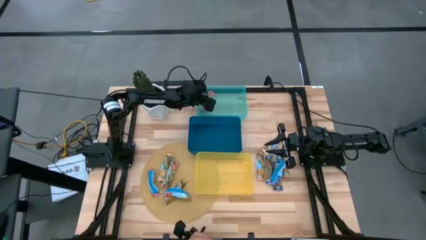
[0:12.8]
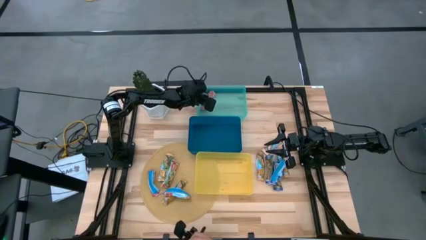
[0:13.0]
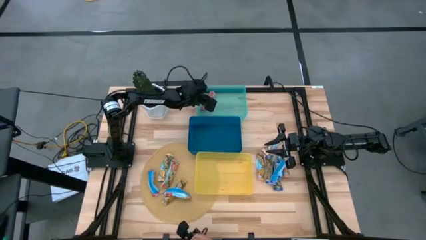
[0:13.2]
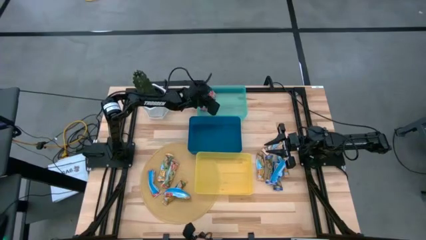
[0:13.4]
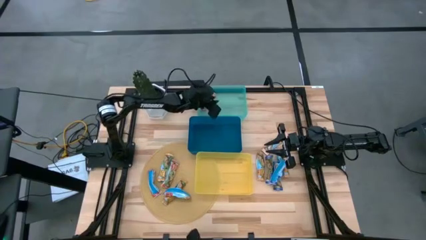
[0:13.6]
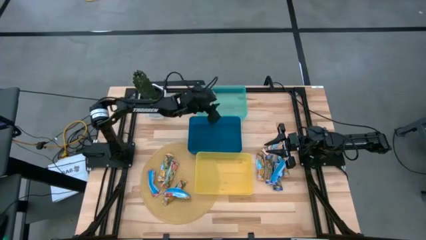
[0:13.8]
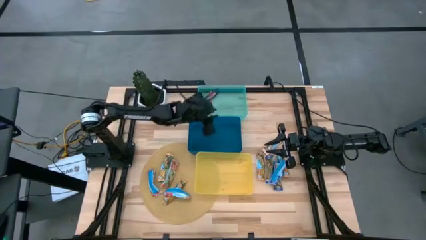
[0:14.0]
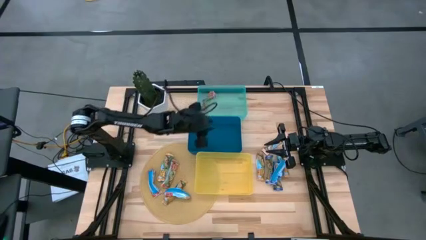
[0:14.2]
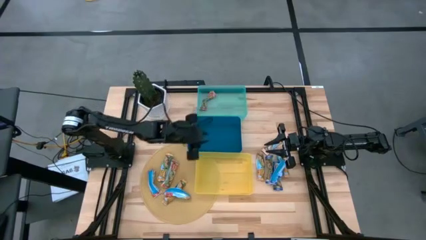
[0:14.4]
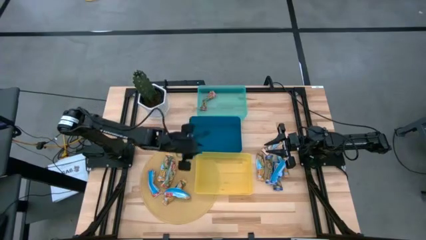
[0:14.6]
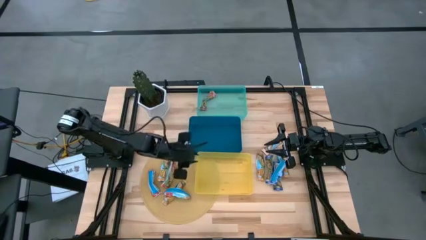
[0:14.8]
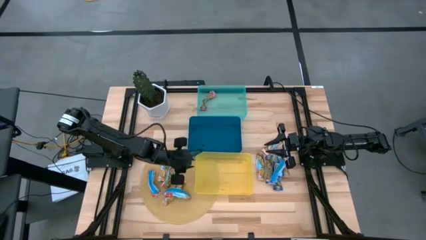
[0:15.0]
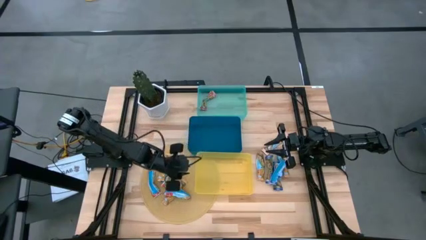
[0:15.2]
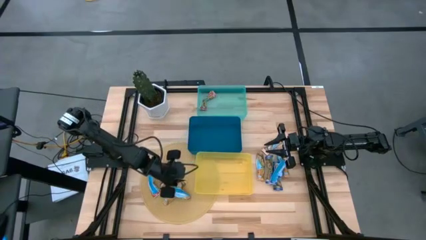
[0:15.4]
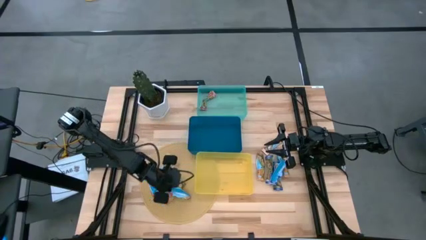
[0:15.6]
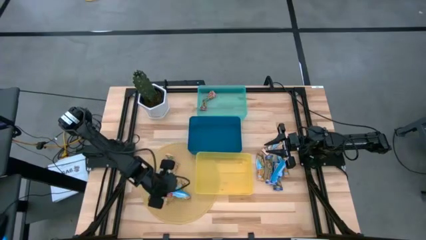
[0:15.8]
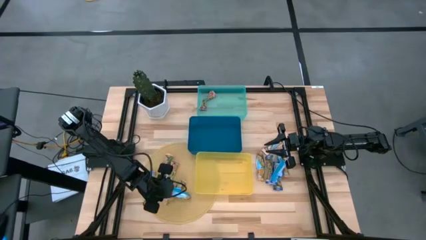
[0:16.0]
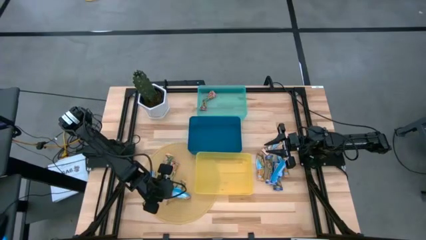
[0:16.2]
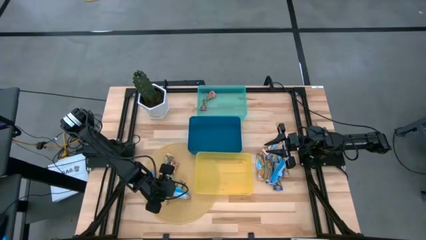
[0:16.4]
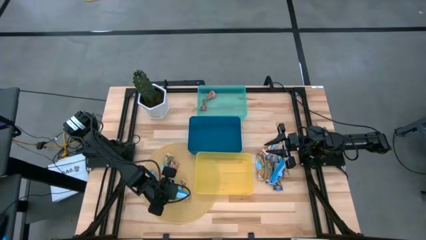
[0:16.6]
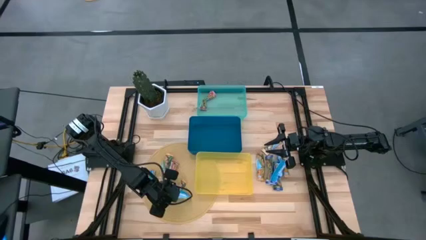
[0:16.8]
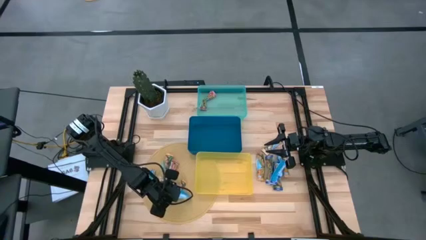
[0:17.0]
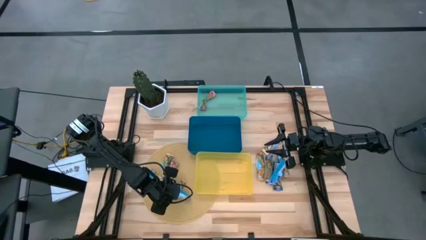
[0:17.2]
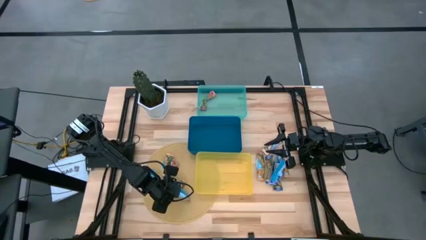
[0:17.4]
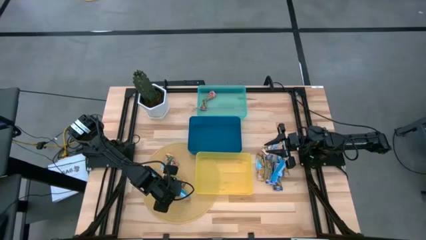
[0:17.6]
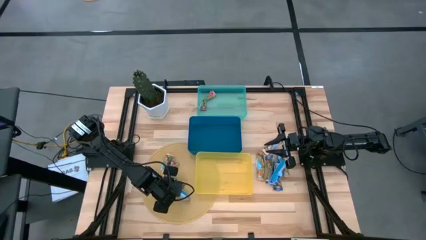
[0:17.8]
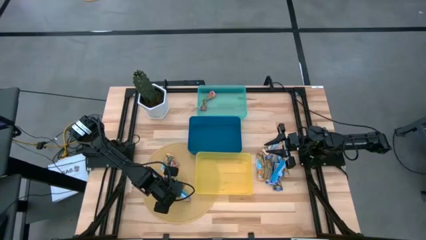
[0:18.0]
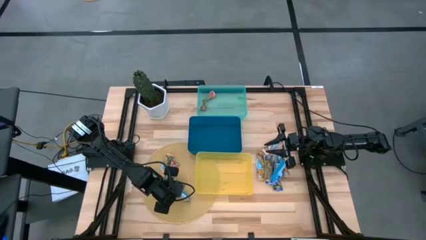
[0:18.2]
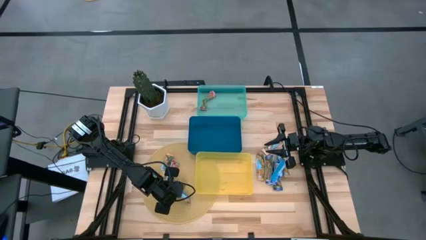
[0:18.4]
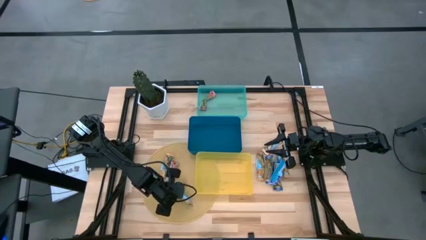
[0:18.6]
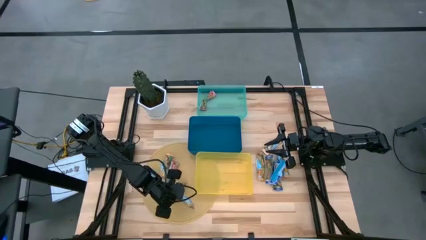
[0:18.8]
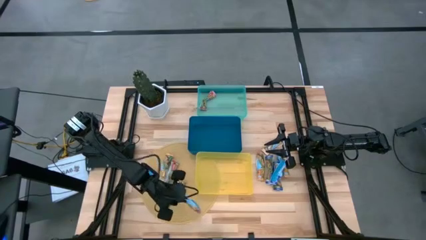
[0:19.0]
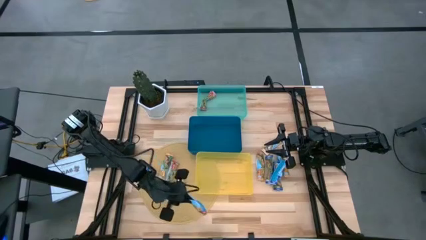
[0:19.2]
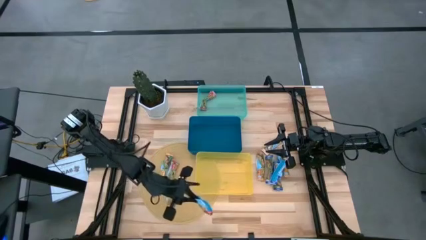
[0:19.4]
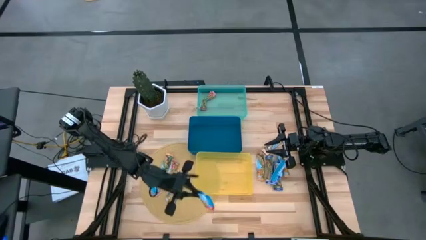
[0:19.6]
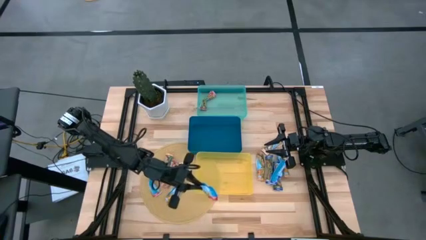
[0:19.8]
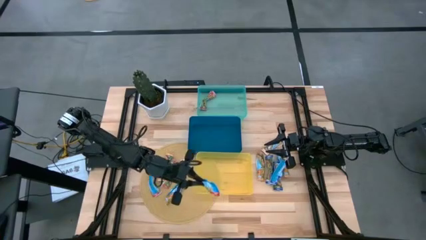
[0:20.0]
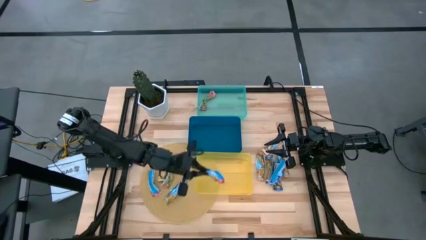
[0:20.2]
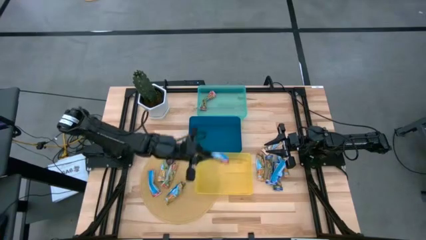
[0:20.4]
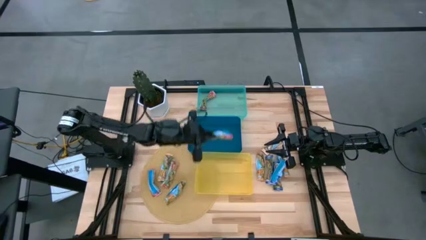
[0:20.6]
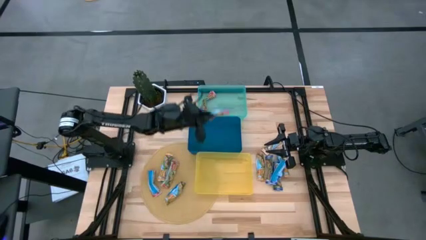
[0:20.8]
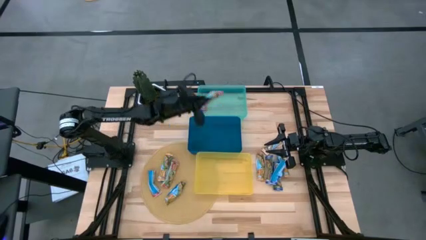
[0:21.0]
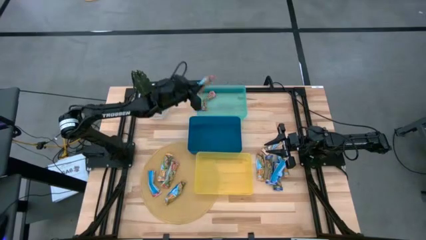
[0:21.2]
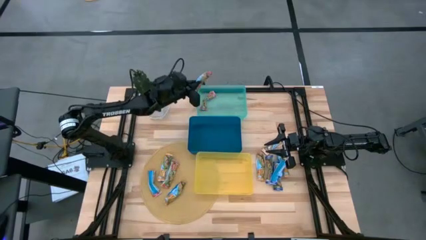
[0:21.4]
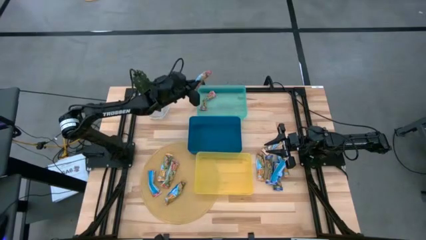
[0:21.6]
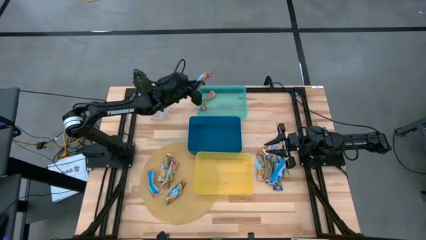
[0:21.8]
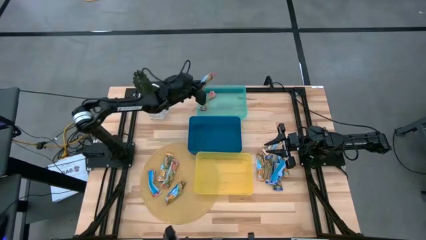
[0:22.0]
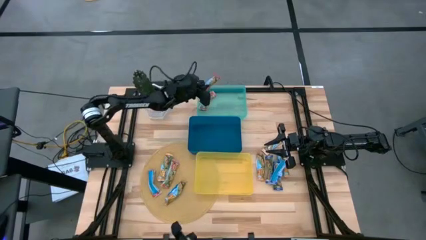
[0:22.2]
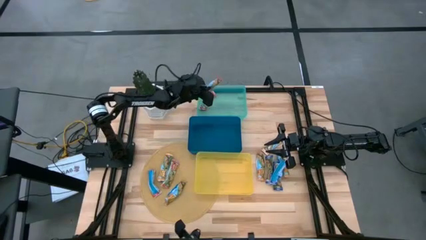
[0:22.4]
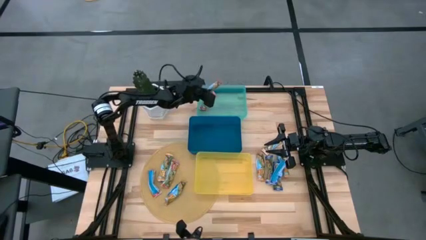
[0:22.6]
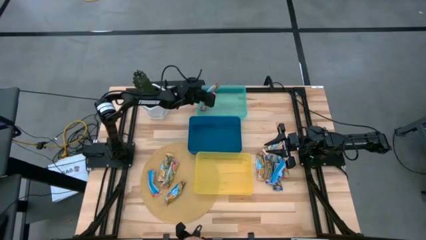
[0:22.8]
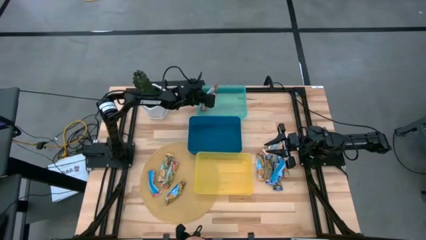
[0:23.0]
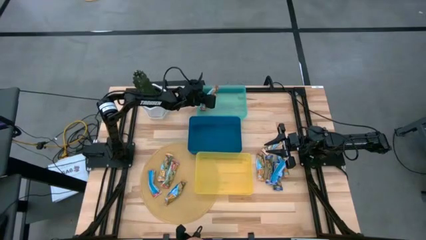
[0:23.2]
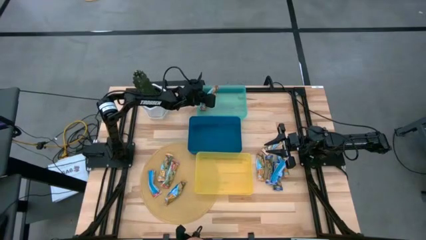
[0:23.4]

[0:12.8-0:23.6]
Task: Pick and place Granola Bars by type
Put the red granola bar into the green bin

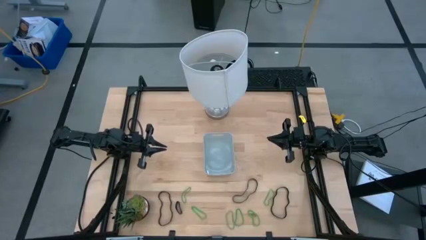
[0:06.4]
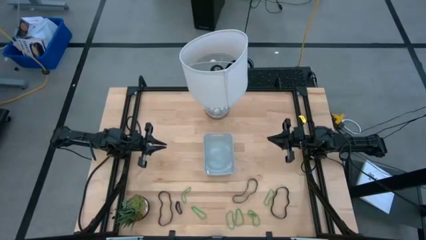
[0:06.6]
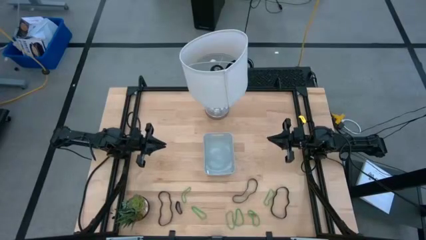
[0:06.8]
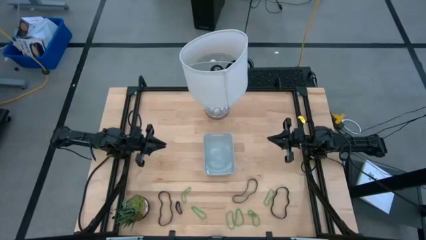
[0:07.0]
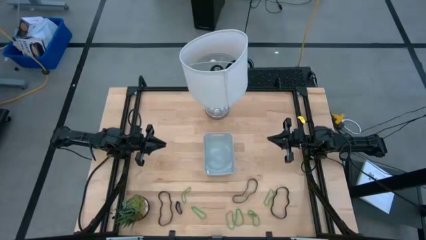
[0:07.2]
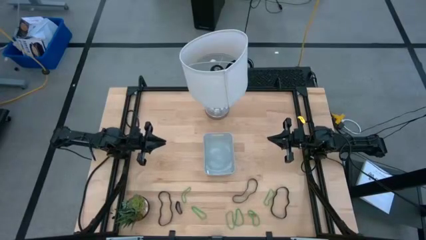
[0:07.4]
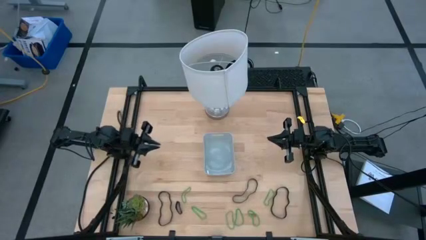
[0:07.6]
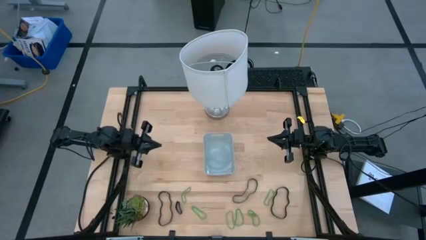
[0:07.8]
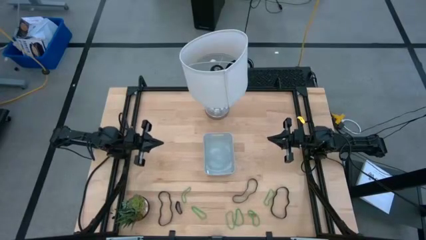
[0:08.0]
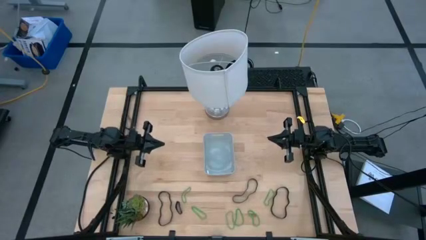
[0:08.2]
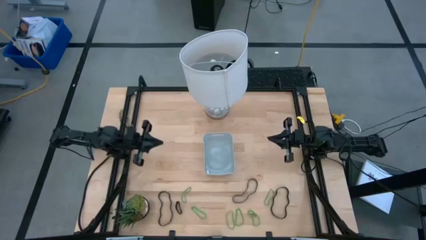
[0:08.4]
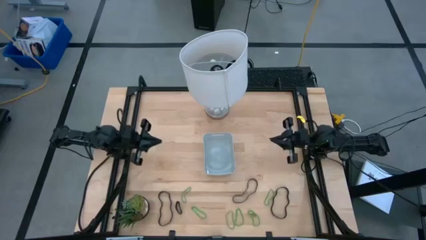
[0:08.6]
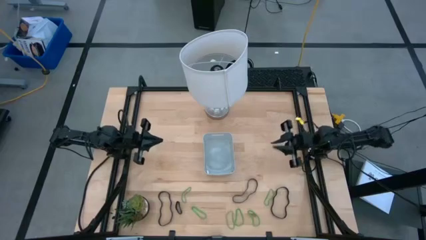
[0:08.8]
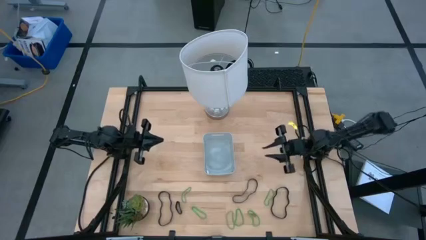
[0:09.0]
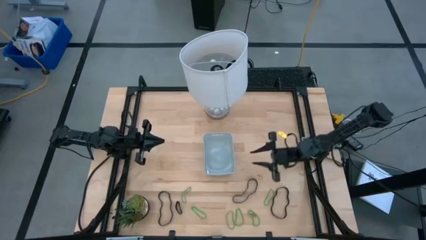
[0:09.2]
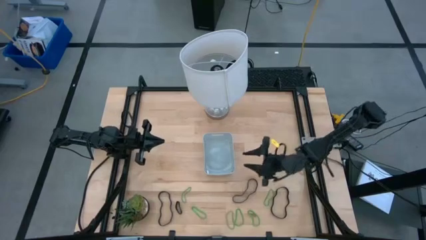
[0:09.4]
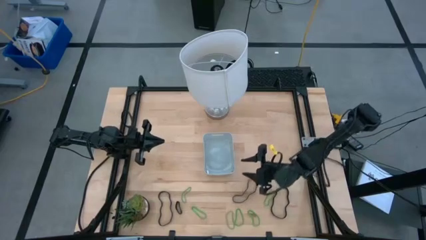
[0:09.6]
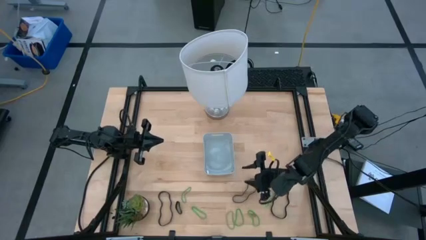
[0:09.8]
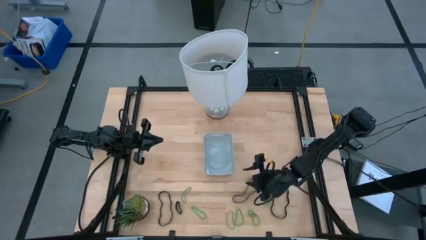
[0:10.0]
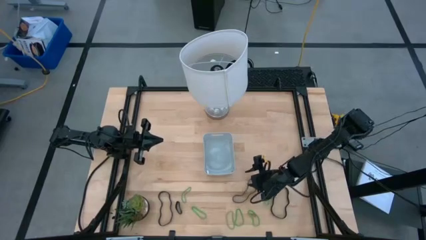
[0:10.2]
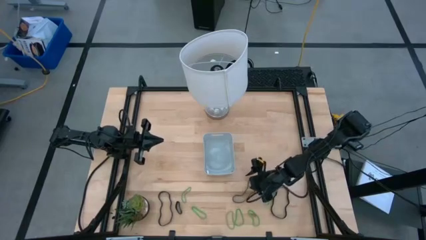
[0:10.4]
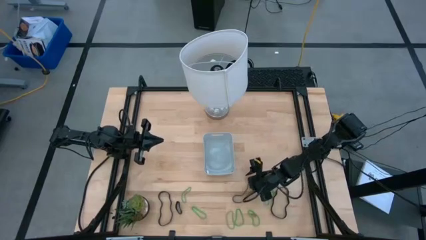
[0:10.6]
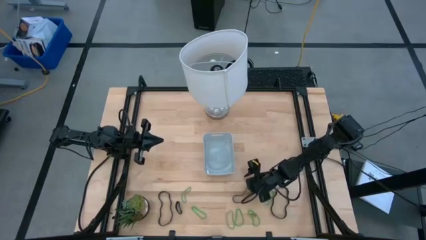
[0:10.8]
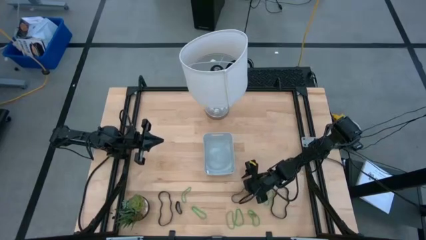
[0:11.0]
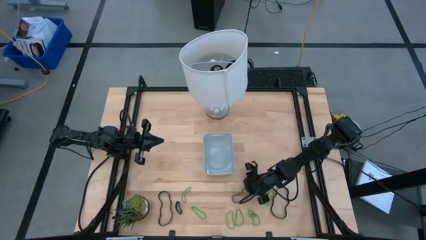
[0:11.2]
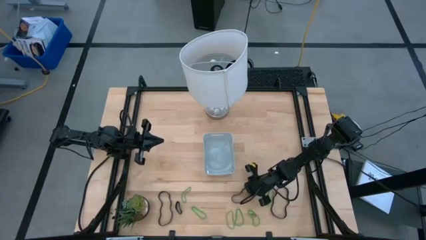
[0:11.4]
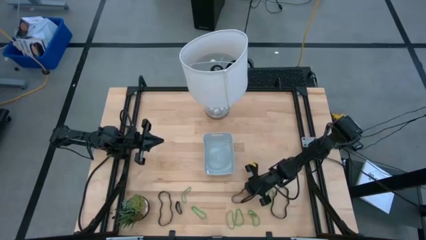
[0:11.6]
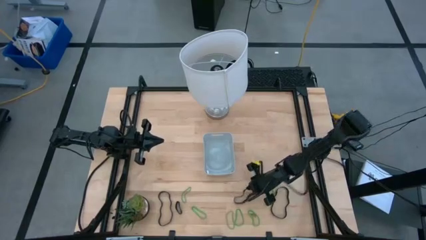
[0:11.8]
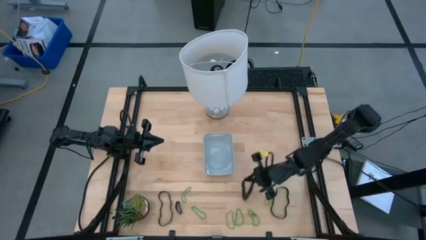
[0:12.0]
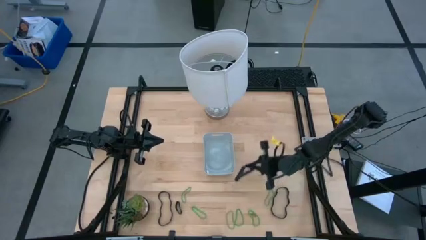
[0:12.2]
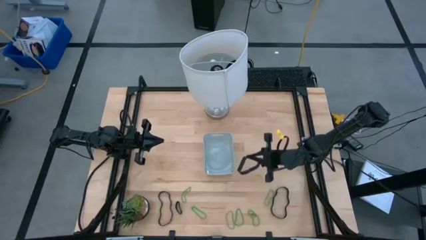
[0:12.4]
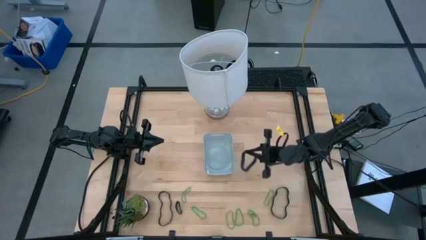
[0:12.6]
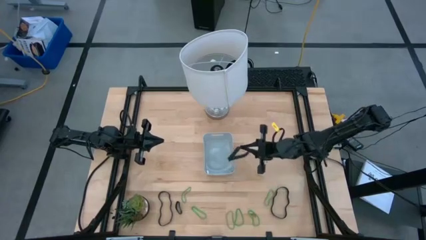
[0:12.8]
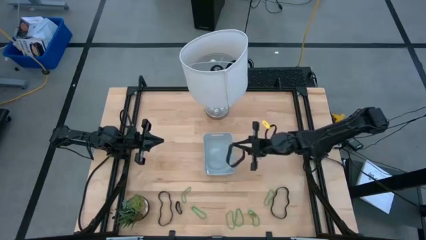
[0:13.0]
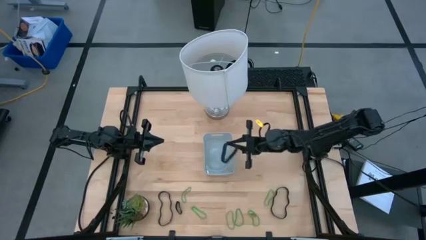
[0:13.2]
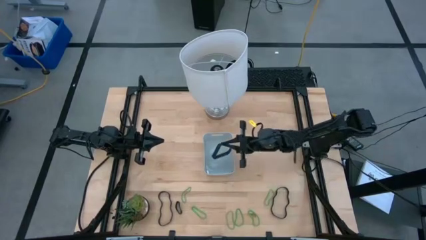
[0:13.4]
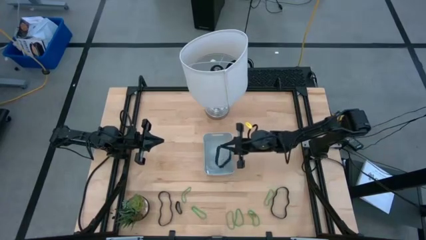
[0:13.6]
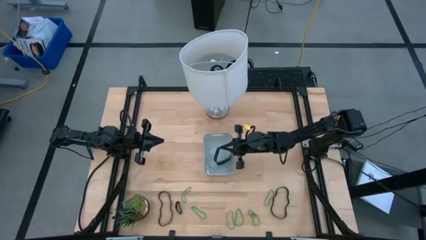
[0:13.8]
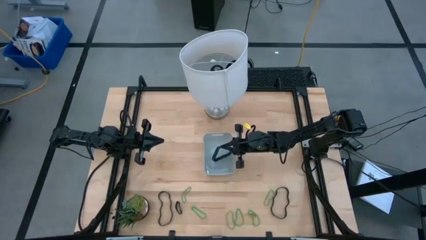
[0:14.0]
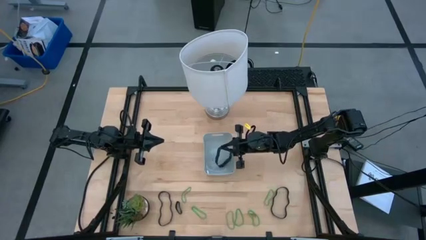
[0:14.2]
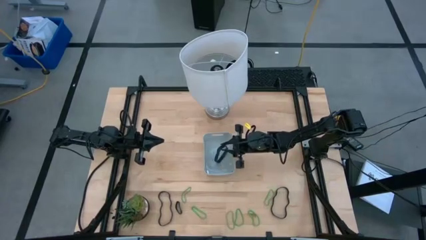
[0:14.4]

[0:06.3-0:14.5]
Task: Pick and place rubber bands into bin
Put the black rubber band into the gray bin
